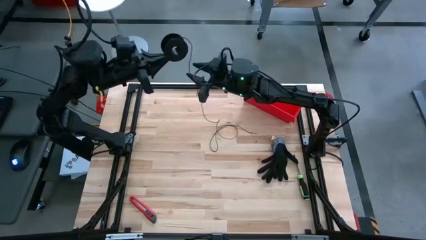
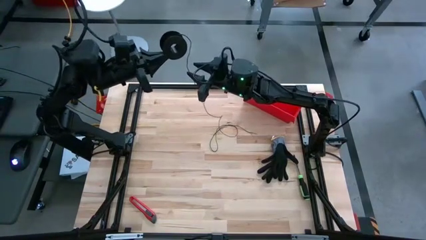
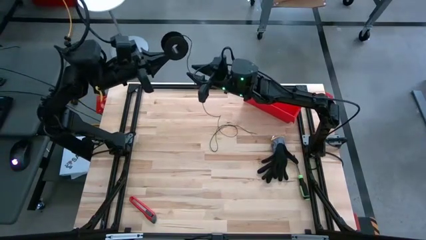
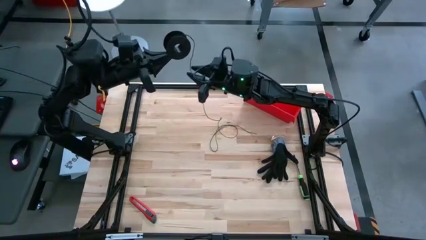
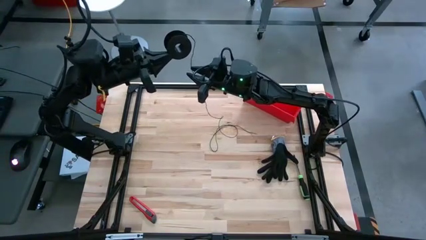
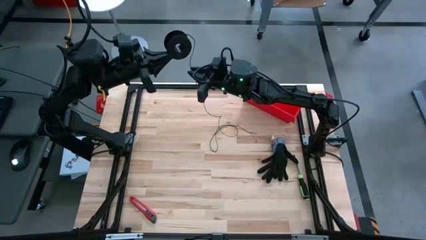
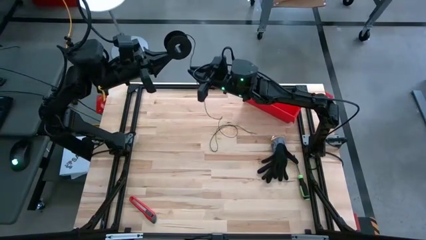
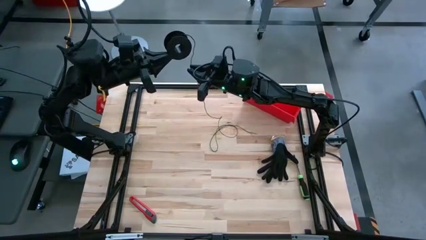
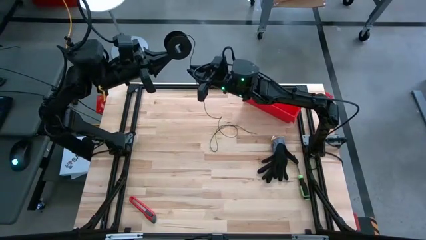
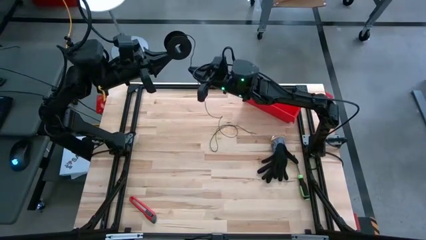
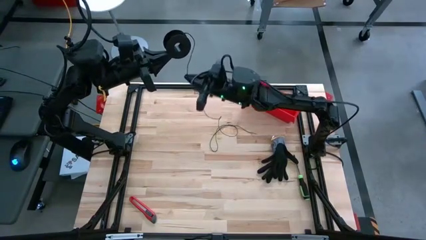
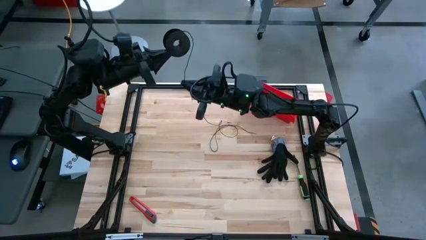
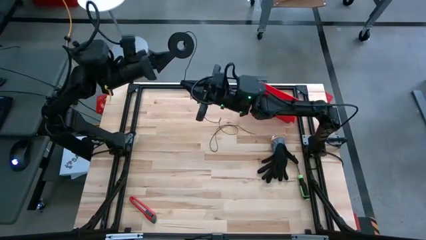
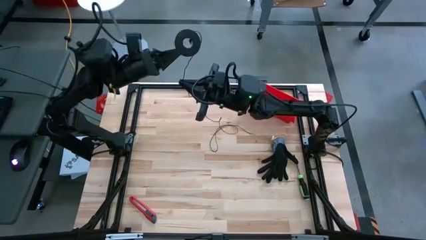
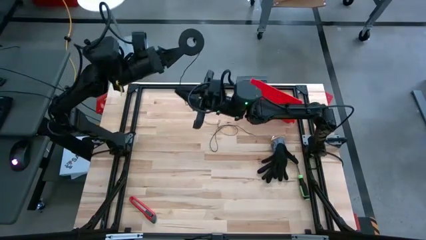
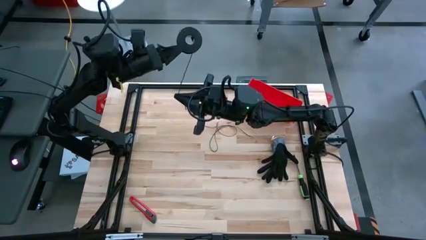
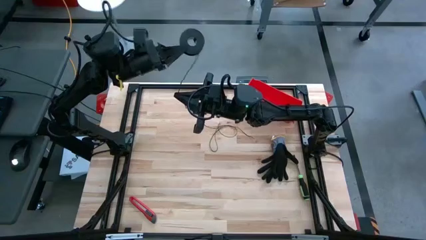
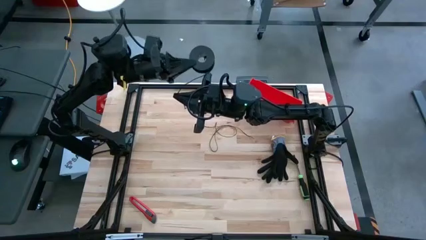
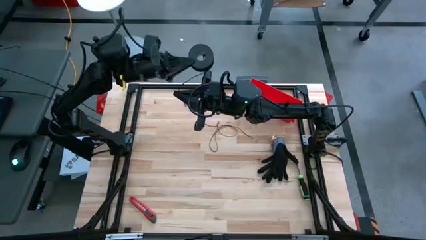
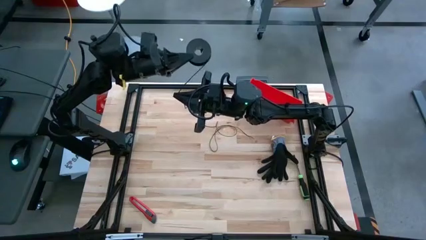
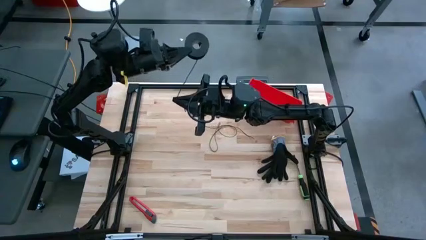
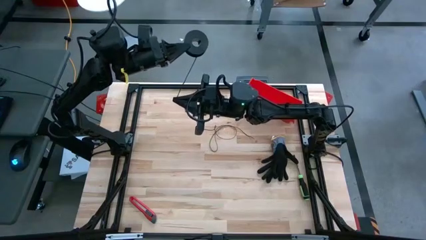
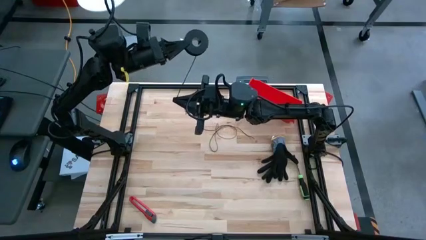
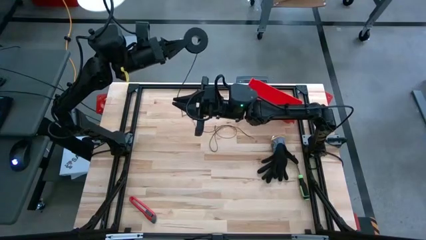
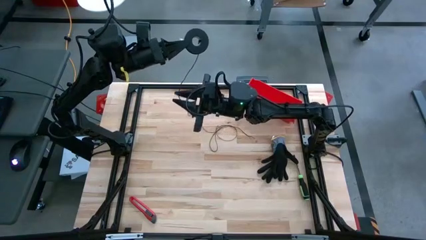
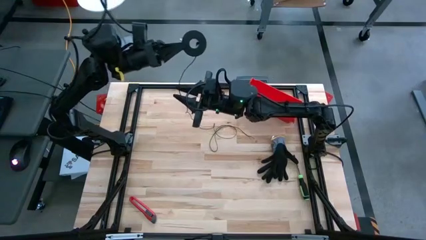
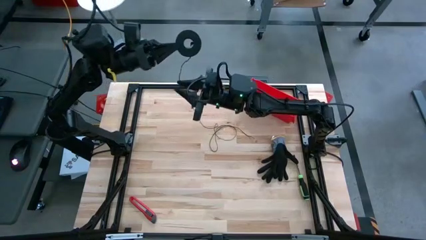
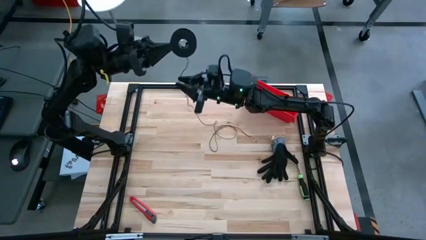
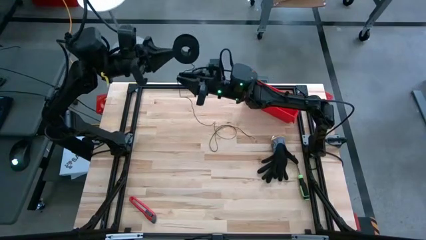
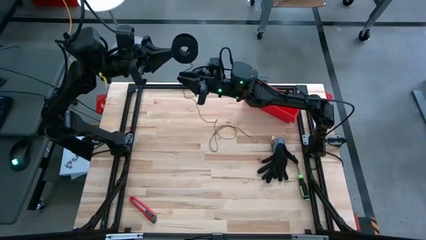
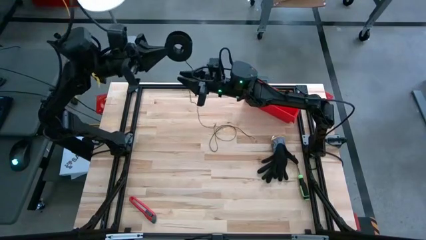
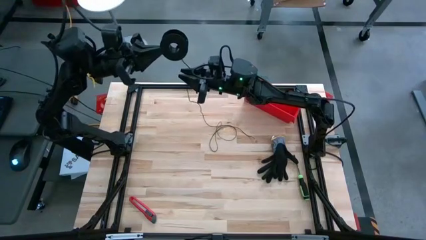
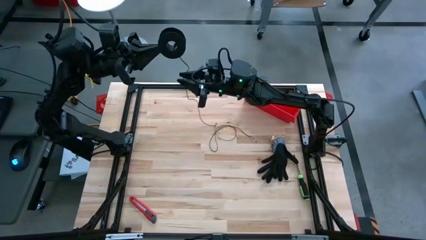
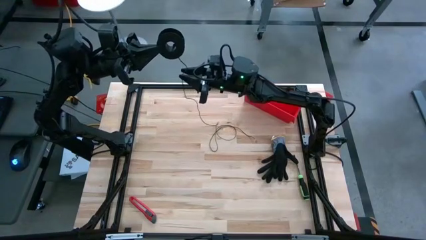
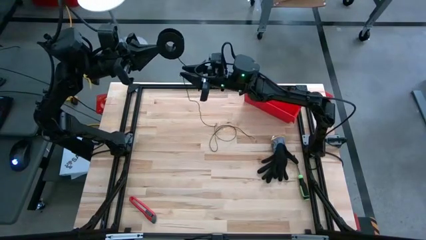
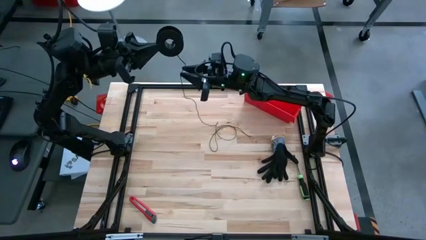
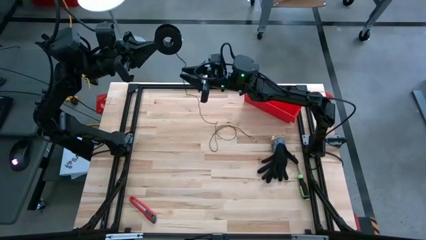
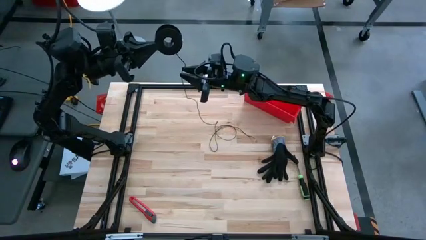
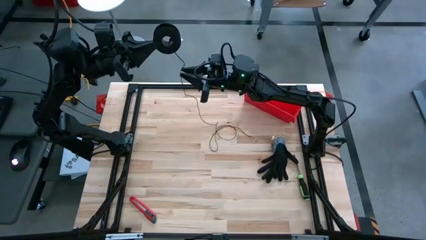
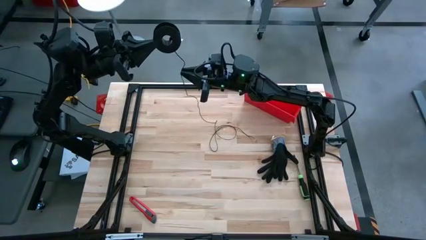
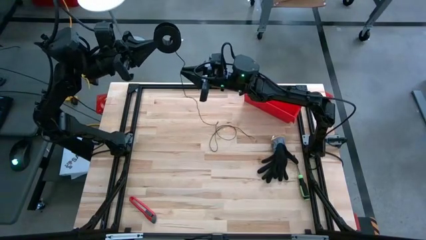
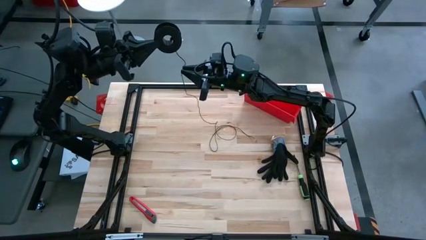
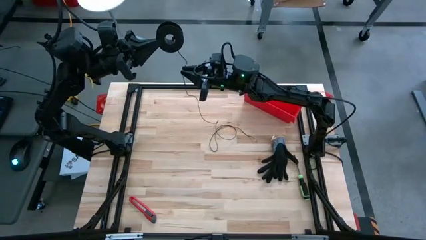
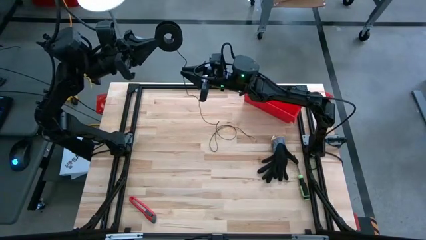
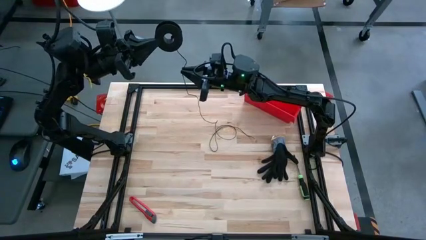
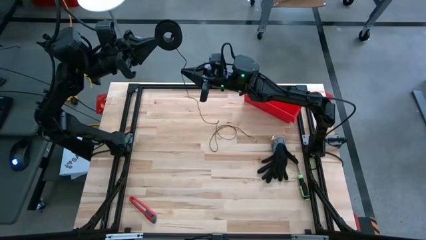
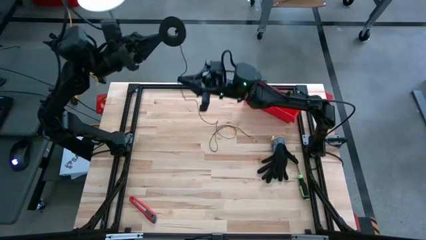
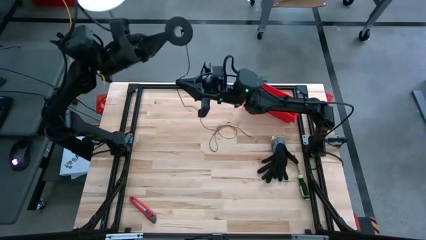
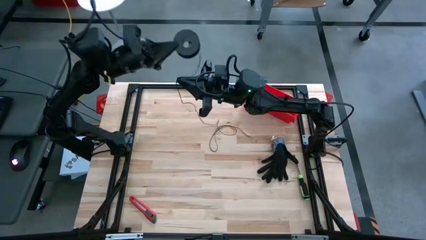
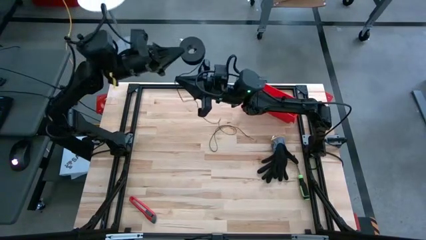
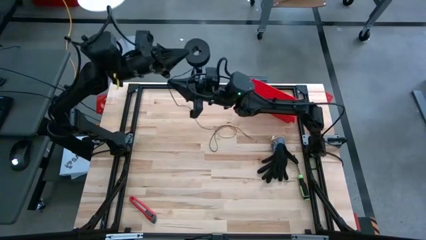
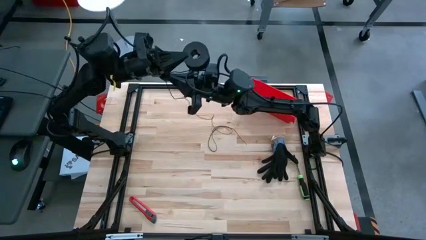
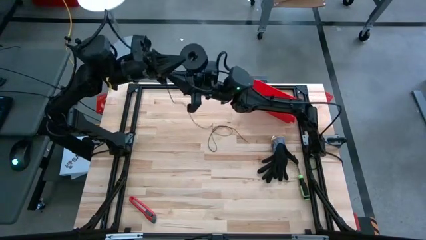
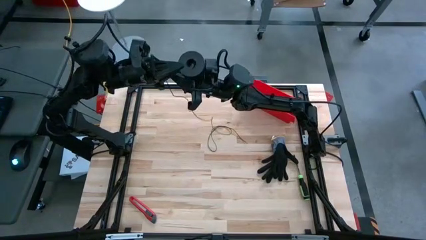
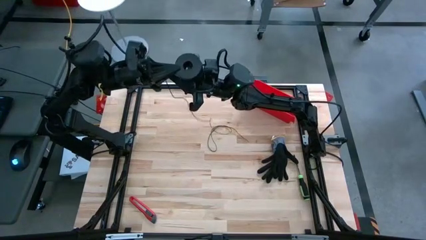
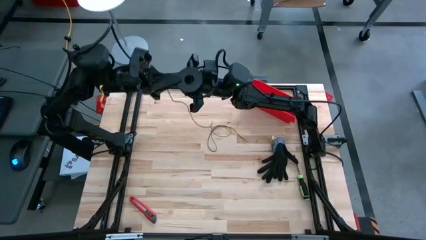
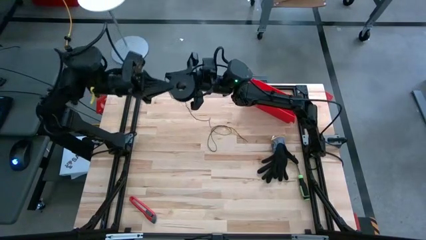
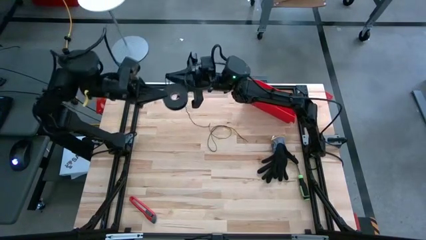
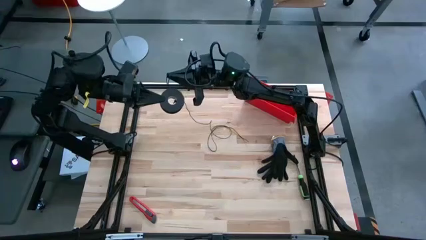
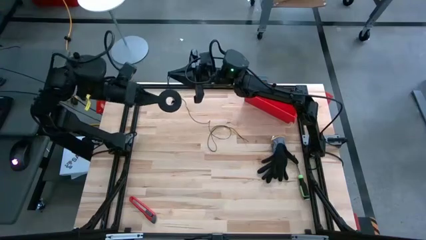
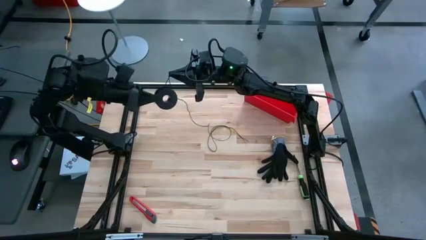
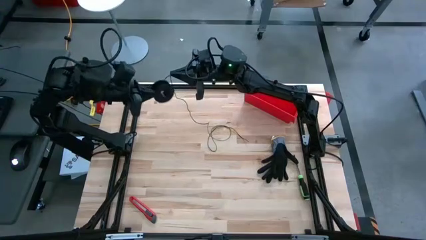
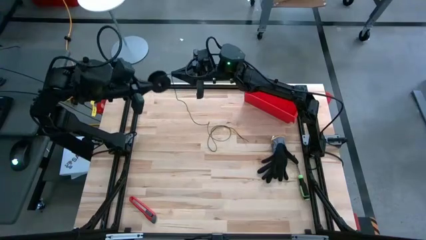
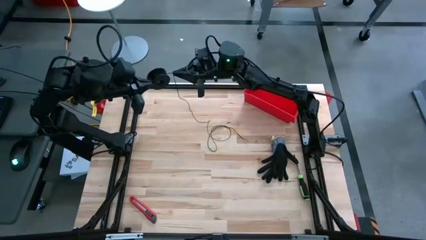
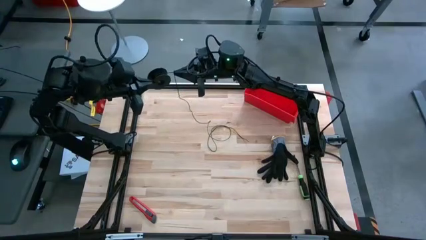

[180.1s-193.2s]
Task: Coil cords
Coil the black wire on the spool

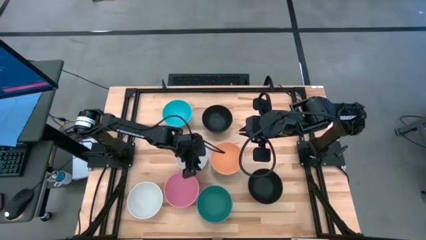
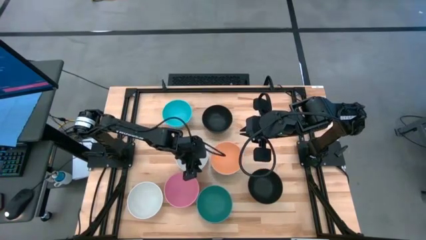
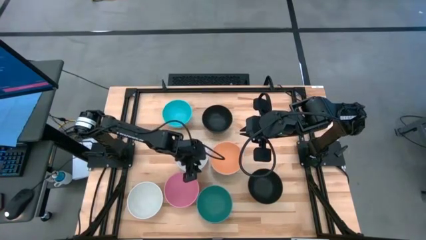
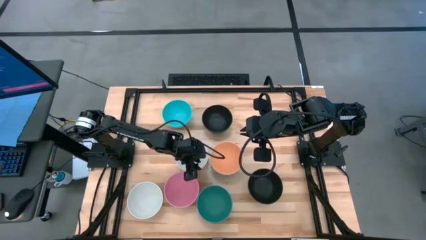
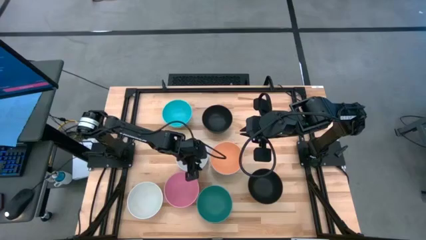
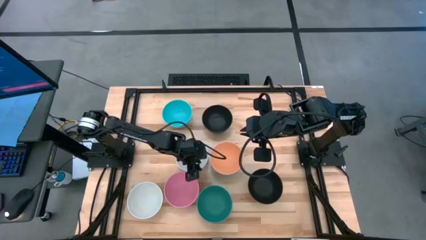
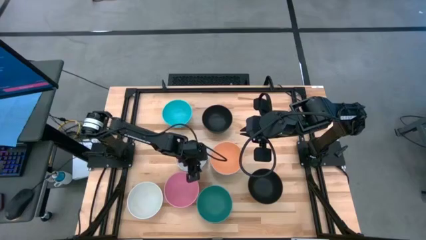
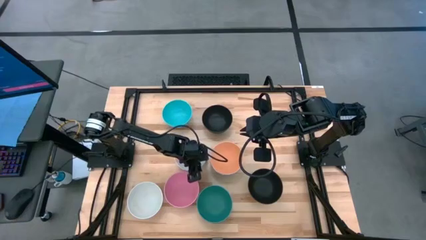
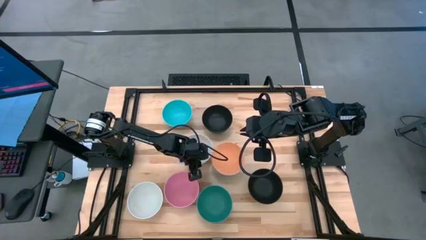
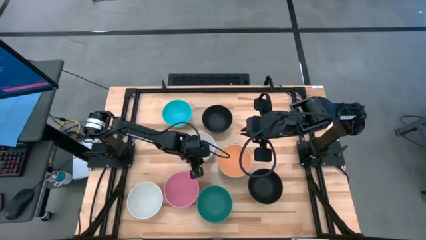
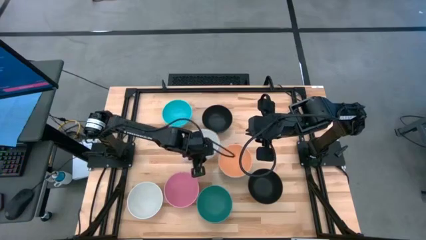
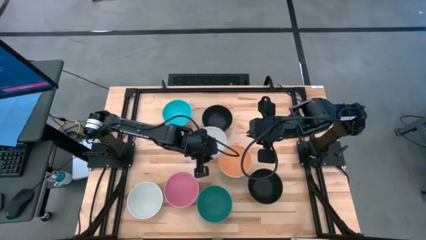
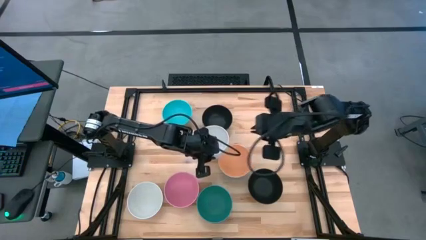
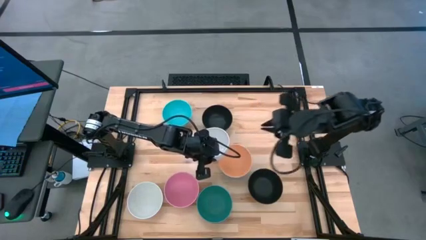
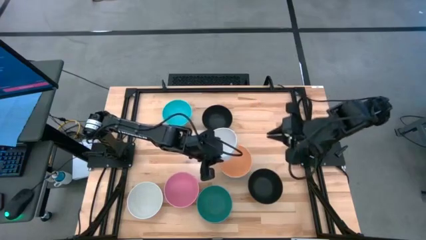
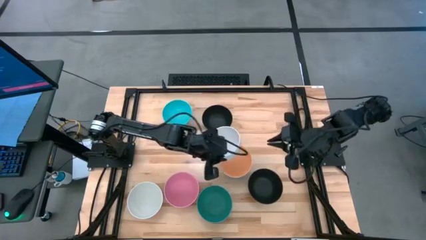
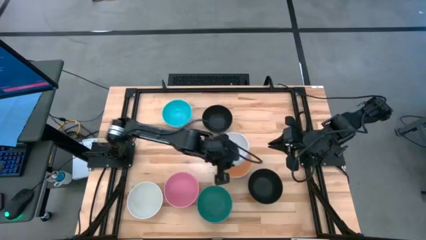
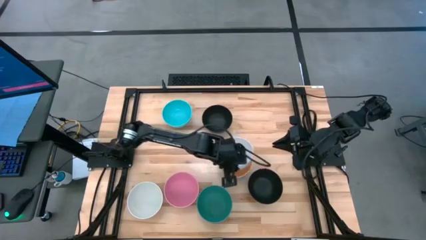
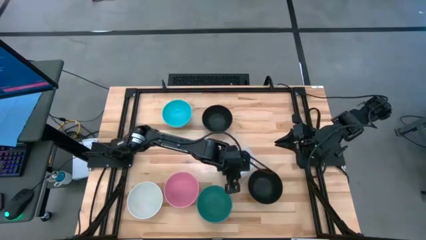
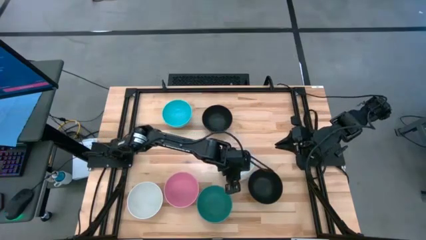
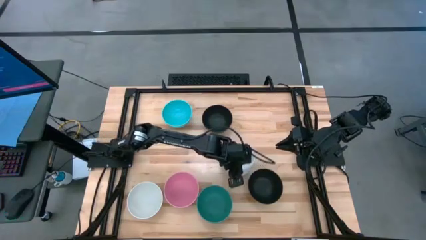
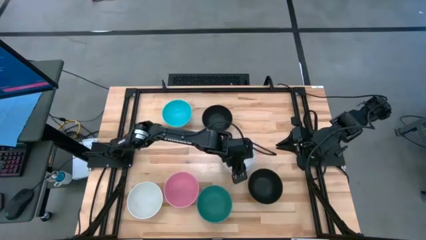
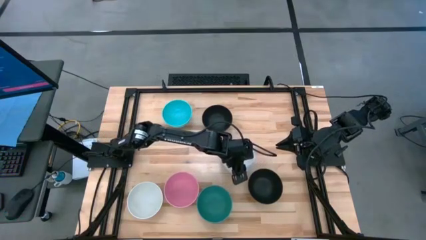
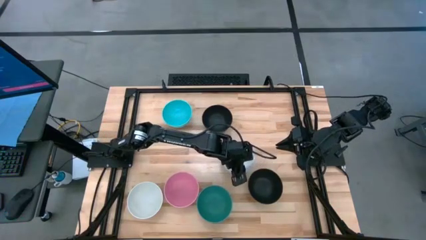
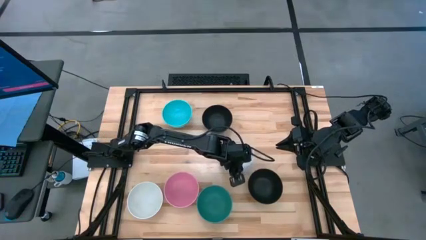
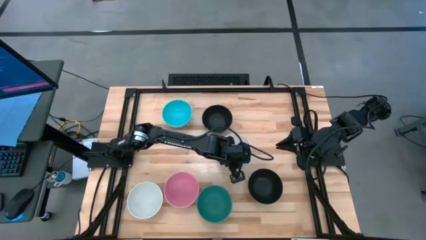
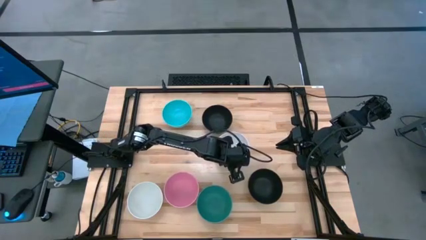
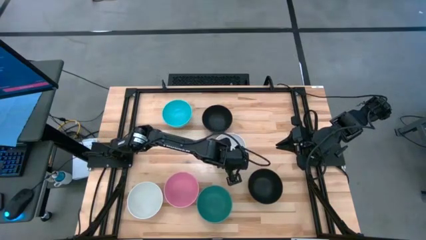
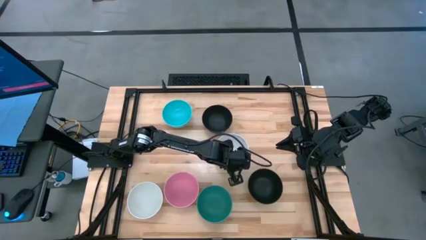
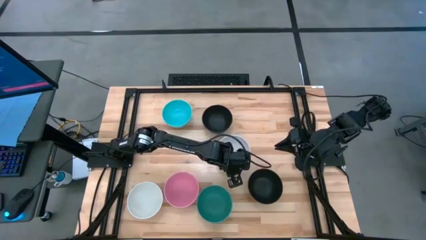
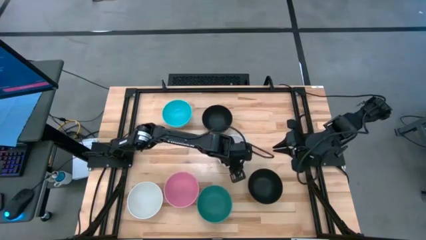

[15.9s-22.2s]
Task: Nest bowls inside each other
Stack the top white bowl on top of the orange bowl
